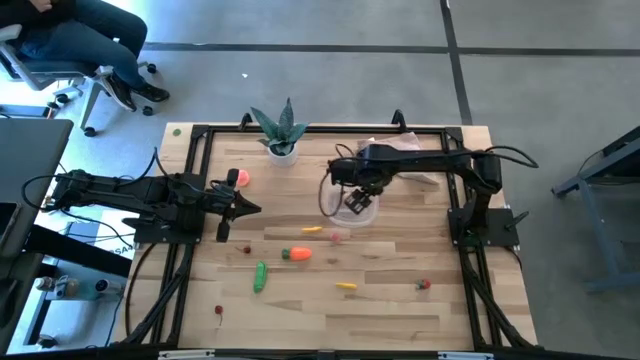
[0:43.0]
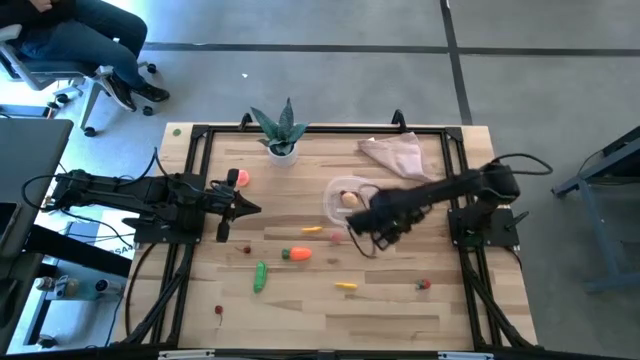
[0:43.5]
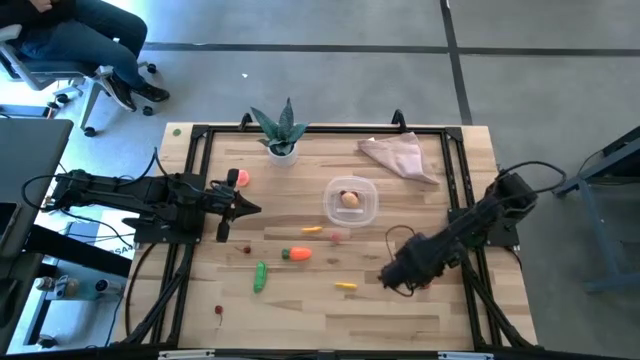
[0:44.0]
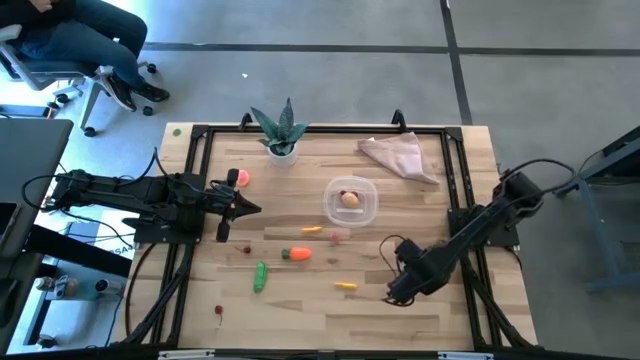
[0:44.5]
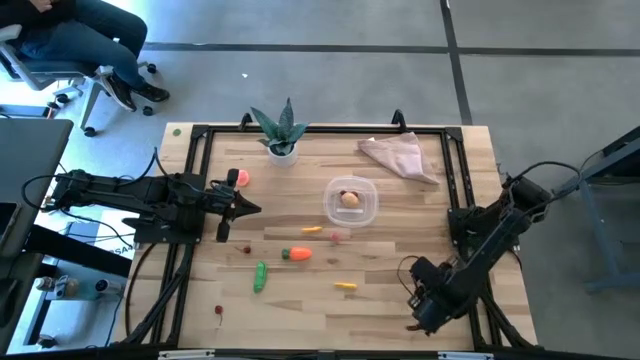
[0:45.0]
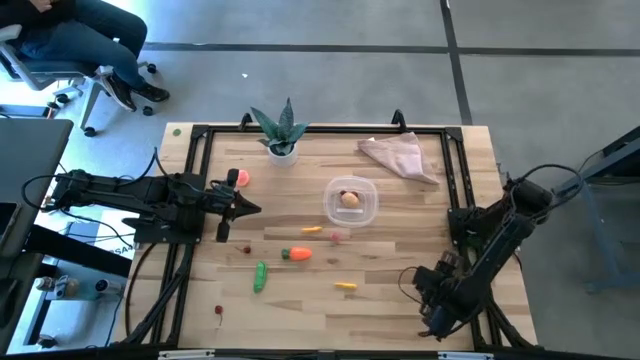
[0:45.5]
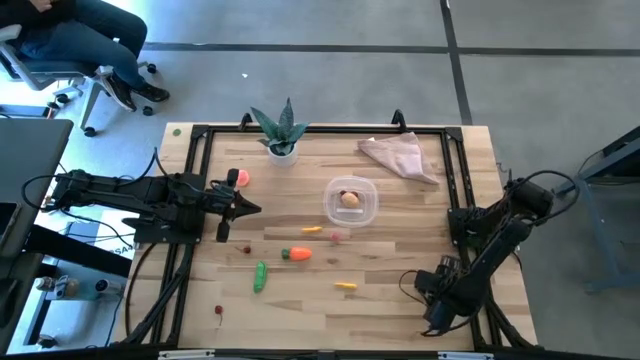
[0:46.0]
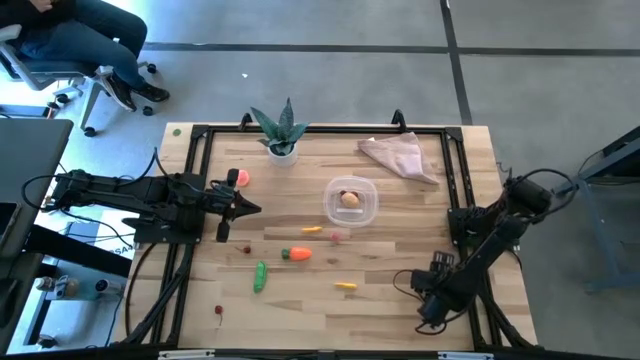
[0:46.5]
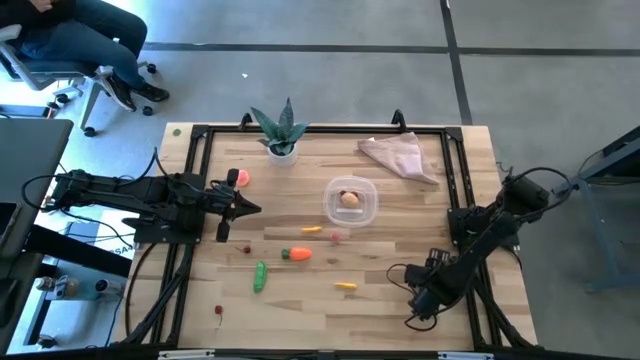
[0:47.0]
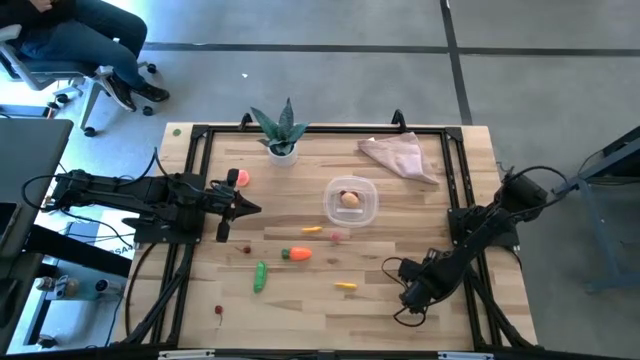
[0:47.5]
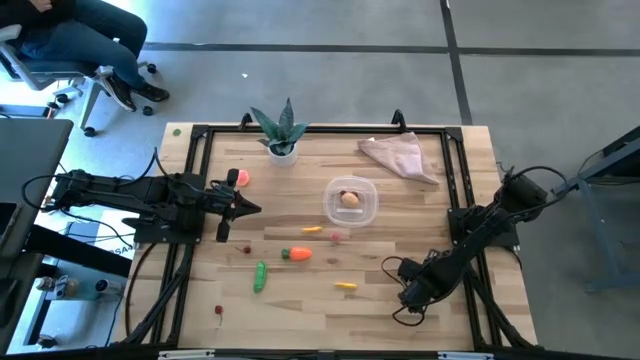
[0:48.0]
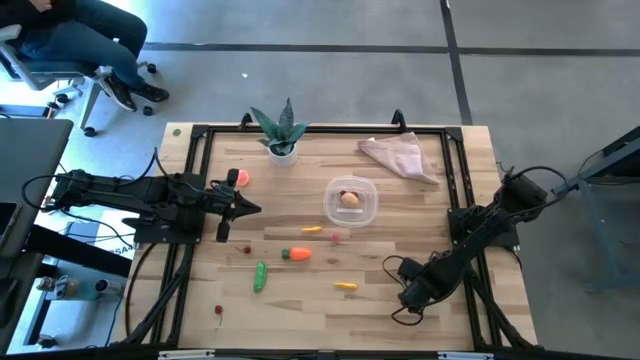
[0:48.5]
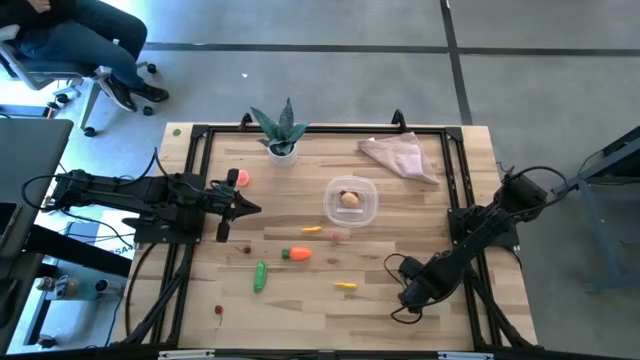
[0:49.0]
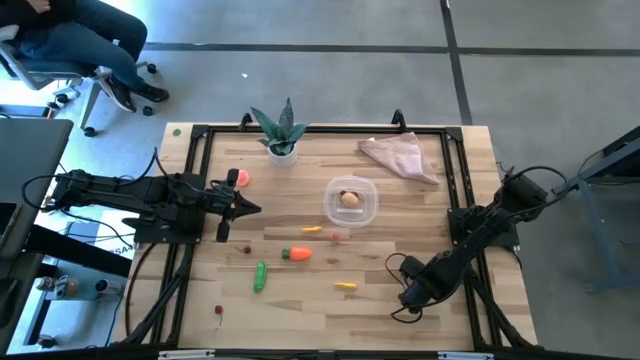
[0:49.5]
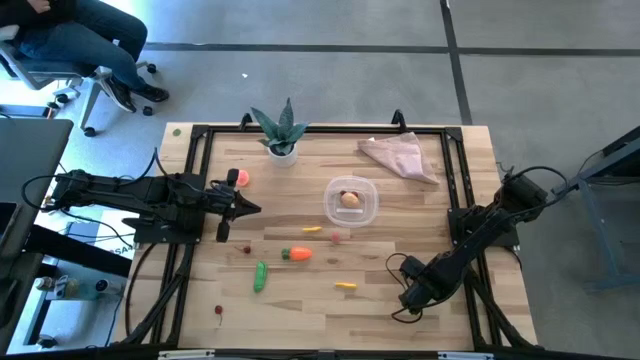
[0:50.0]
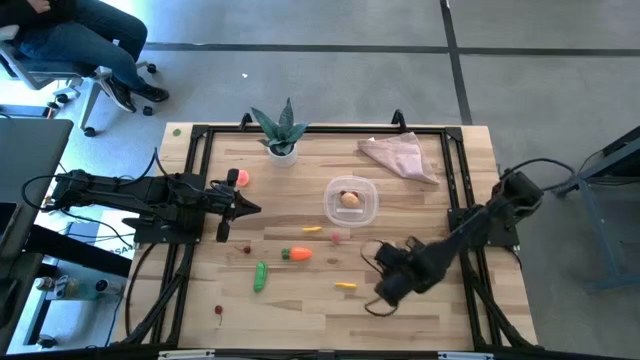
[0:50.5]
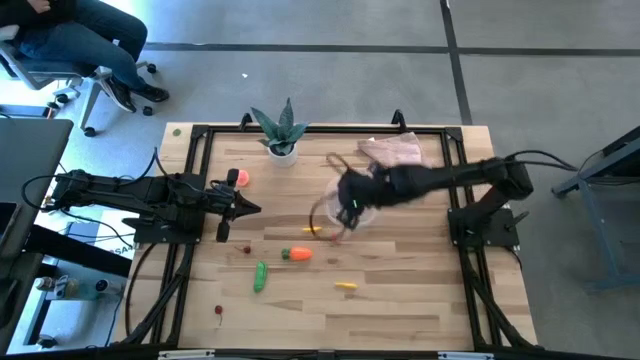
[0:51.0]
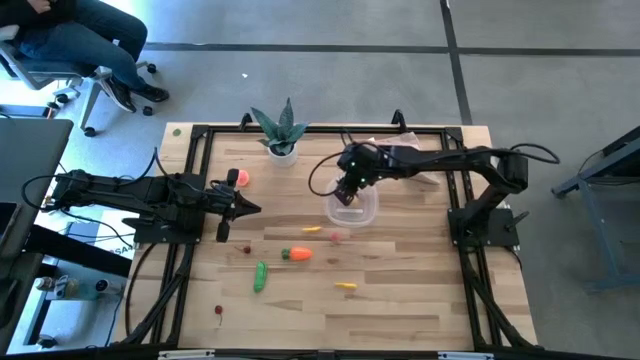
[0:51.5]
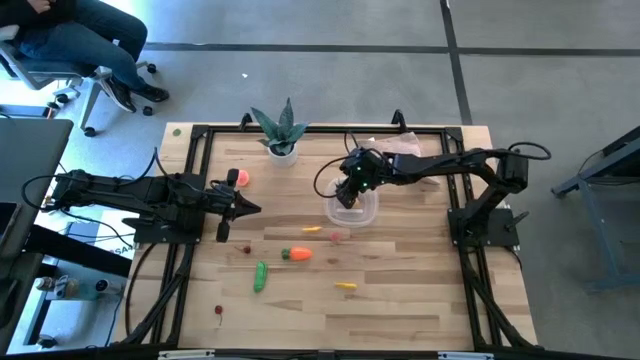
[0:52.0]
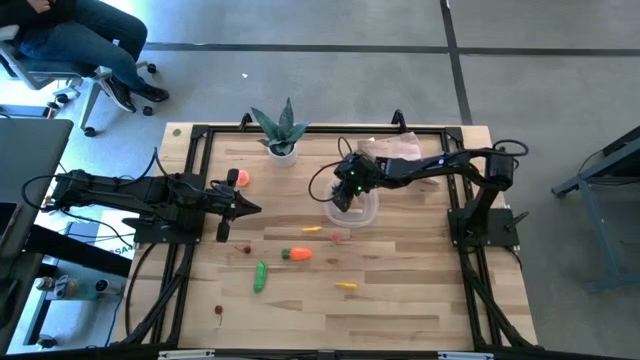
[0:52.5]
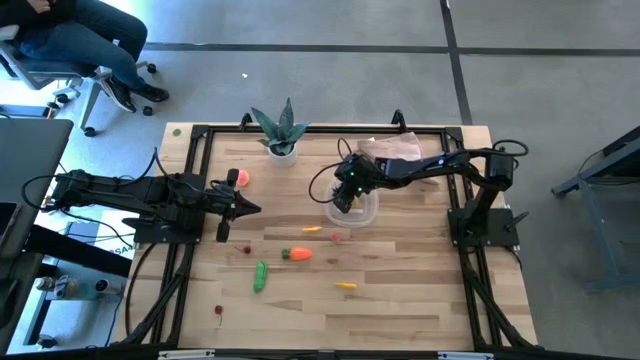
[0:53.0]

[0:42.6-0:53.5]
Task: Pick and placing Produce into tupperware
Put the red strawberry into the transparent bin

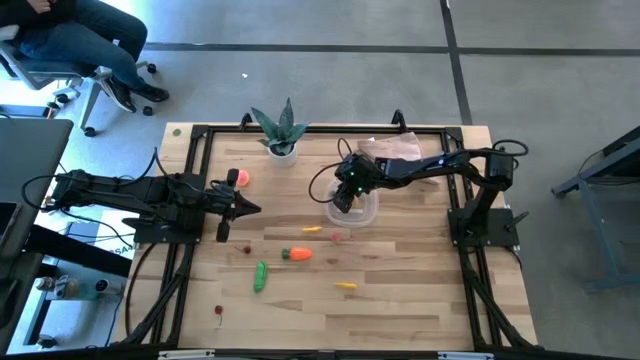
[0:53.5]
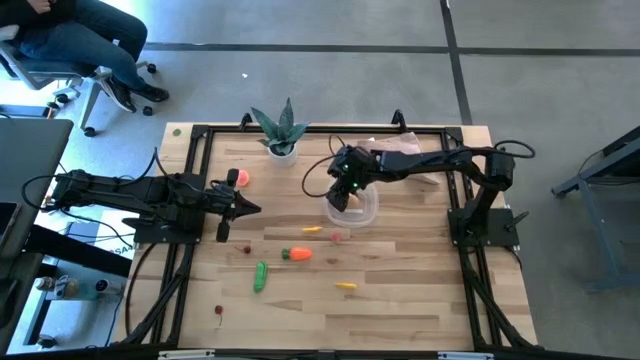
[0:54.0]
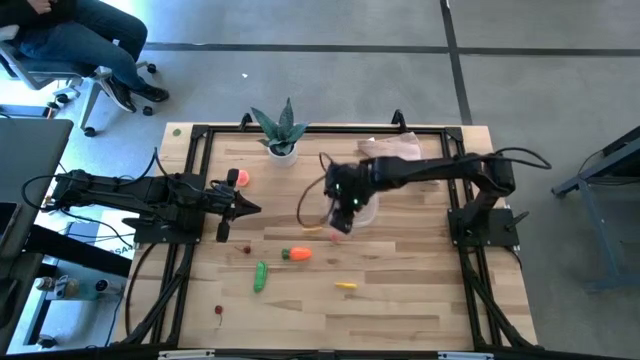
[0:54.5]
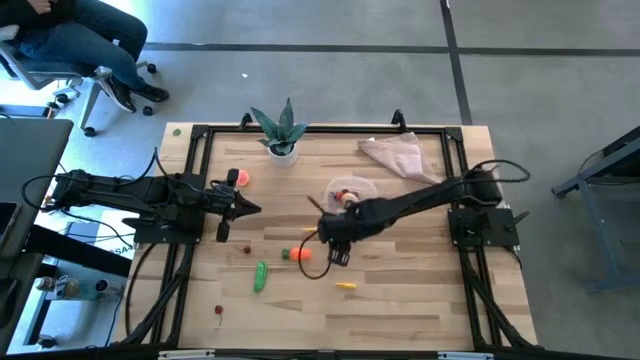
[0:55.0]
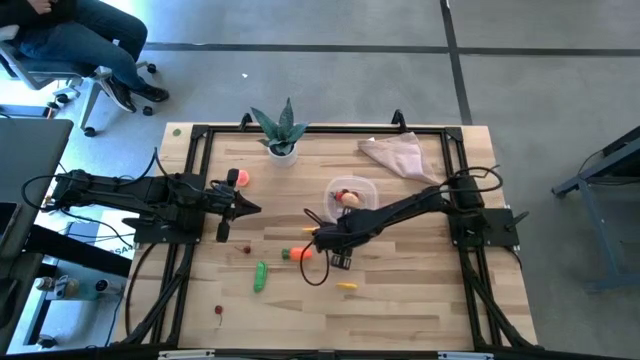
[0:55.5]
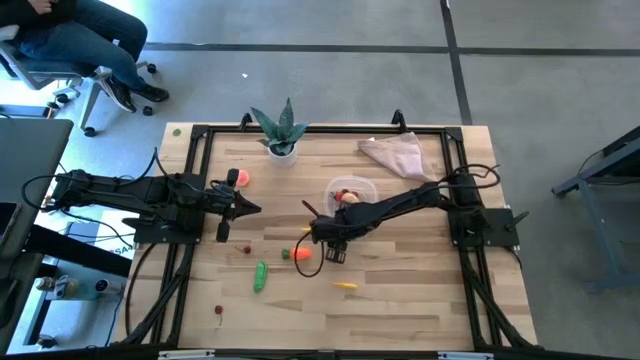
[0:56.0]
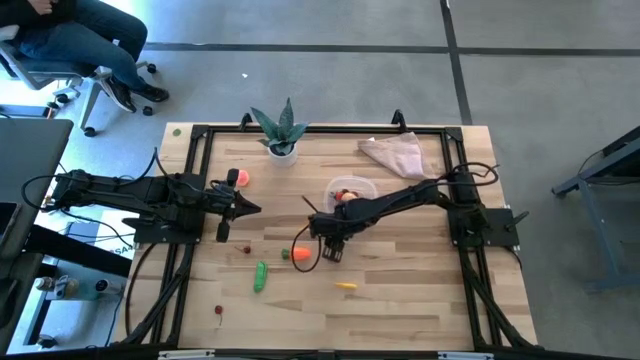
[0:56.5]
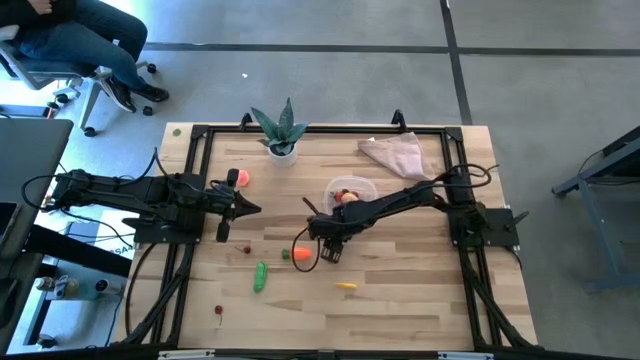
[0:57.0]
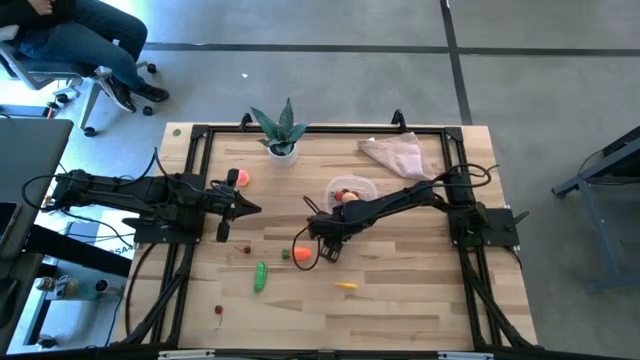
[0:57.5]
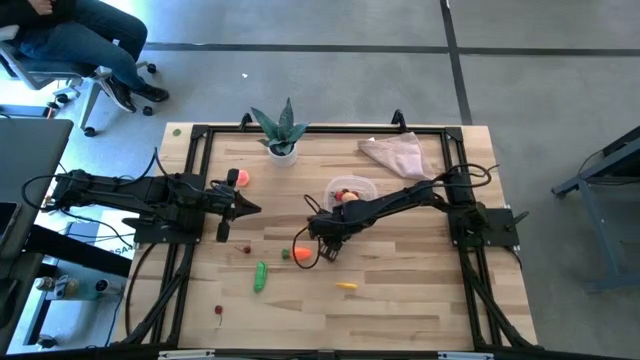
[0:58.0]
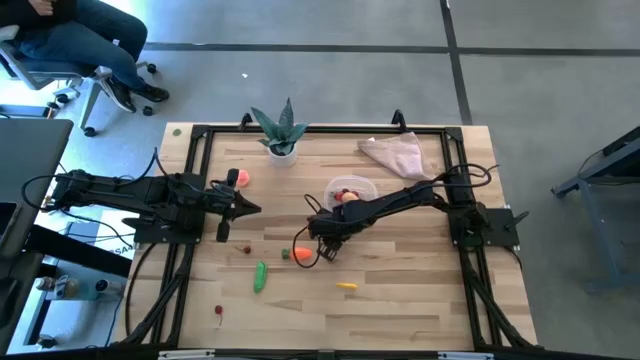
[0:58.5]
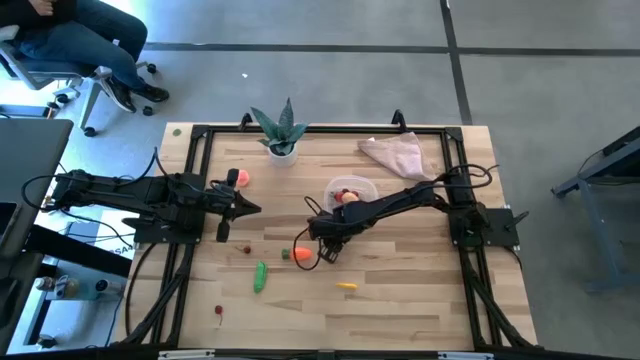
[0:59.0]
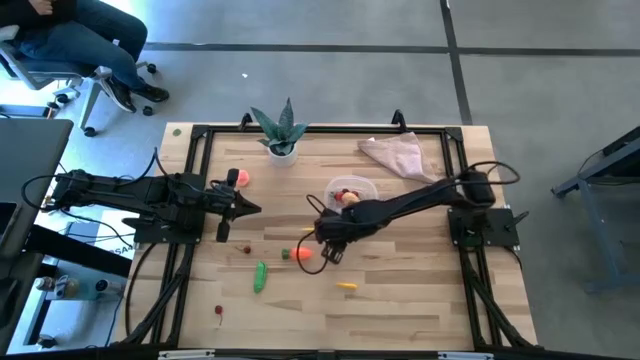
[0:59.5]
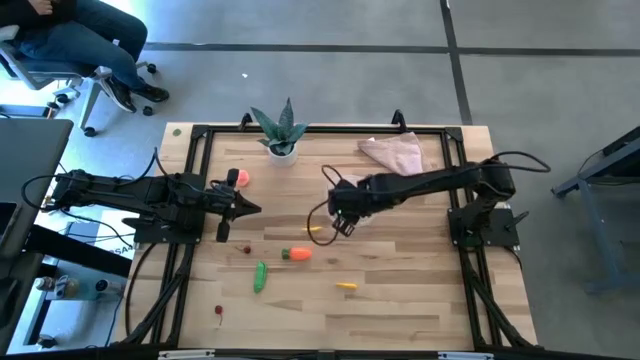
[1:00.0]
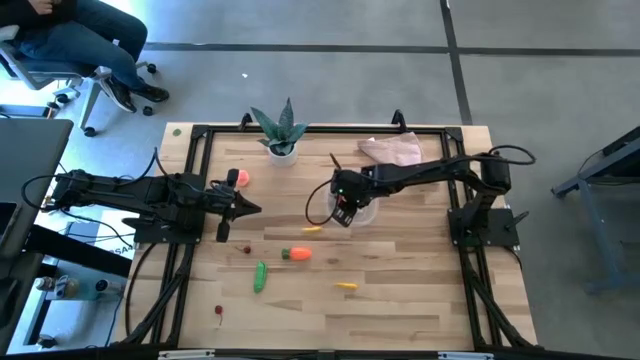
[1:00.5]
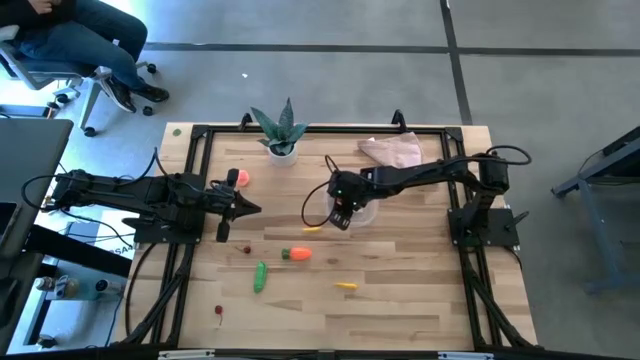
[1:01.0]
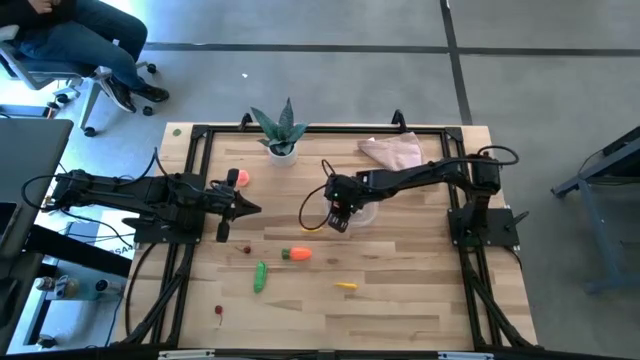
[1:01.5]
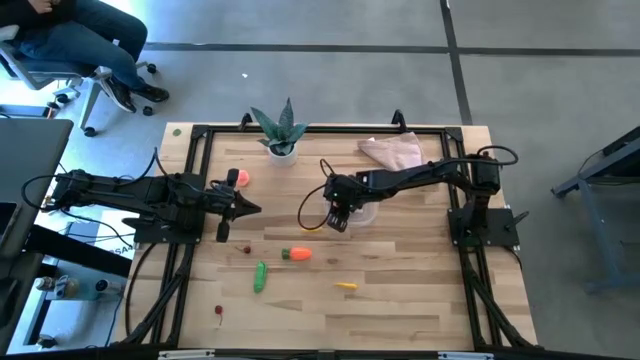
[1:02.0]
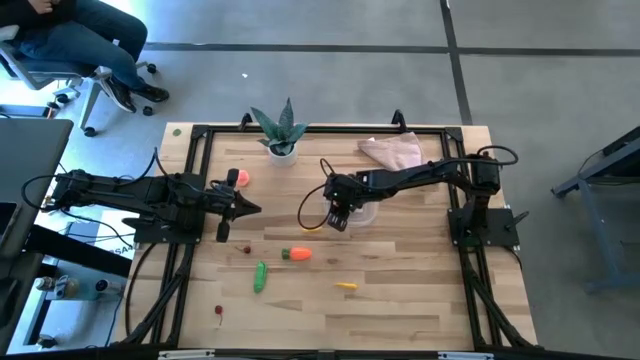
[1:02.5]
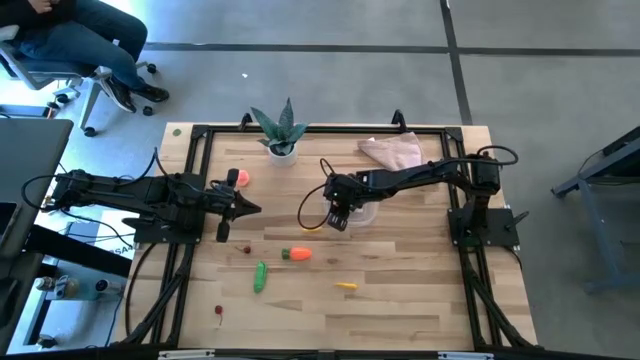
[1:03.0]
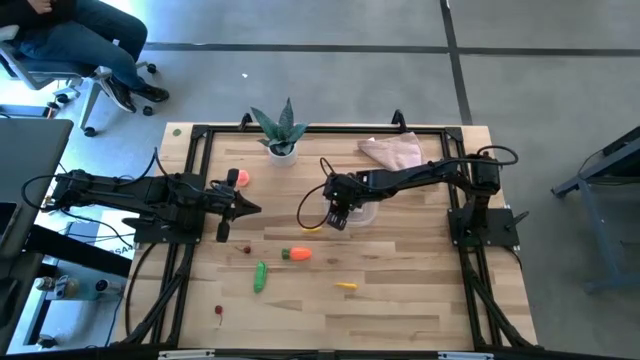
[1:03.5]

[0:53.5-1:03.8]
Put the pink peach into the transparent bin
